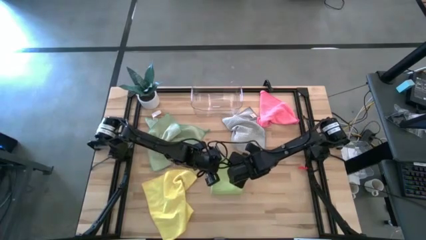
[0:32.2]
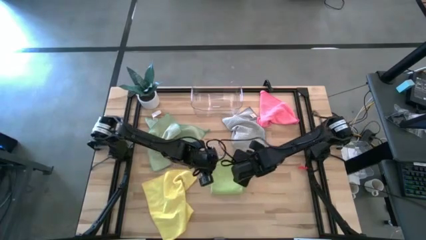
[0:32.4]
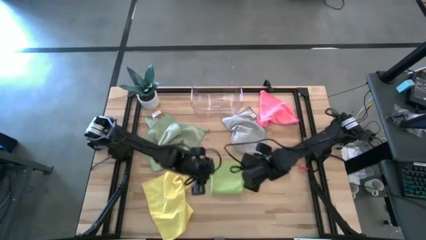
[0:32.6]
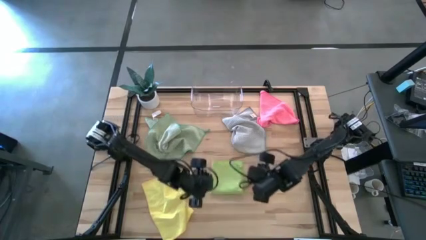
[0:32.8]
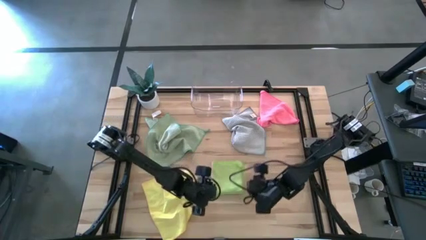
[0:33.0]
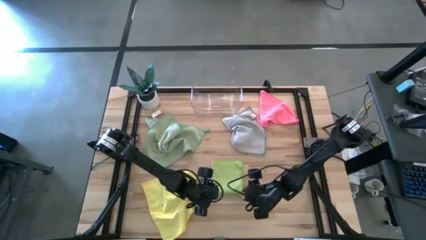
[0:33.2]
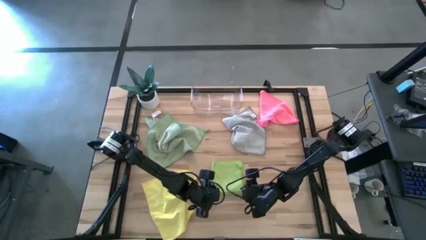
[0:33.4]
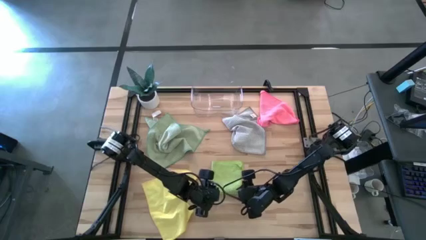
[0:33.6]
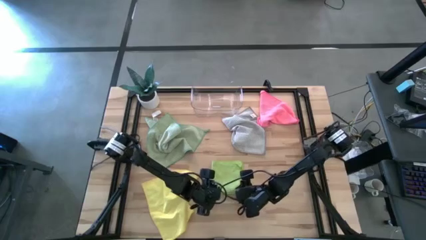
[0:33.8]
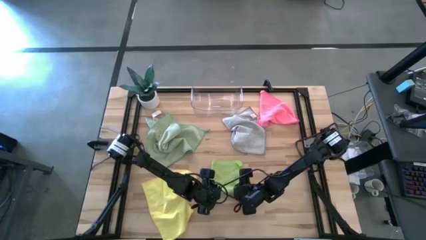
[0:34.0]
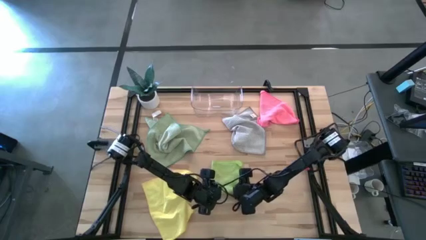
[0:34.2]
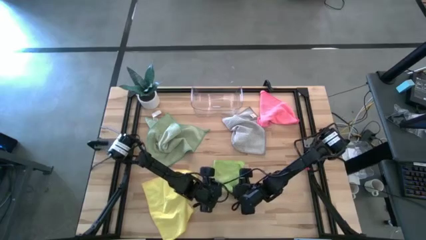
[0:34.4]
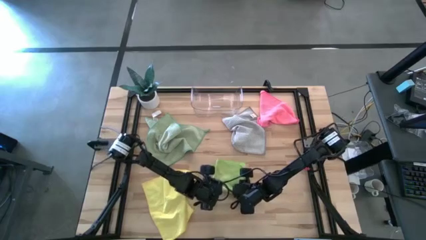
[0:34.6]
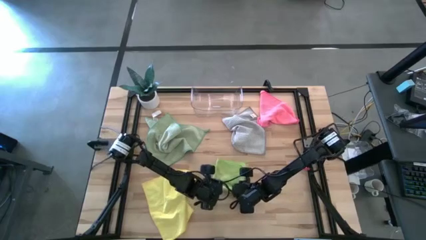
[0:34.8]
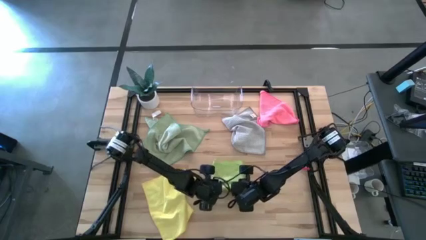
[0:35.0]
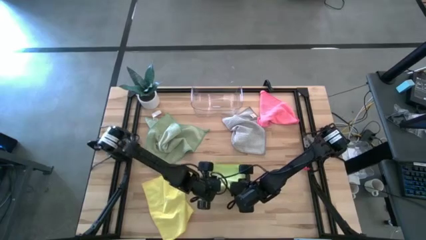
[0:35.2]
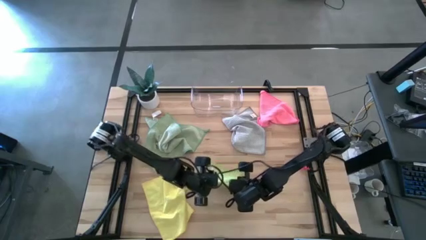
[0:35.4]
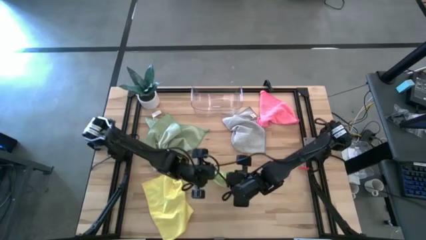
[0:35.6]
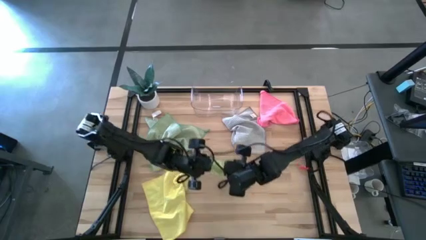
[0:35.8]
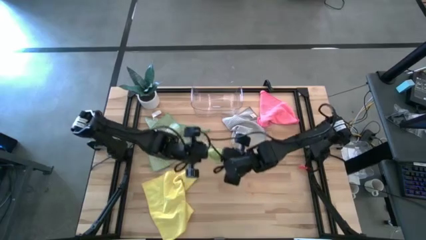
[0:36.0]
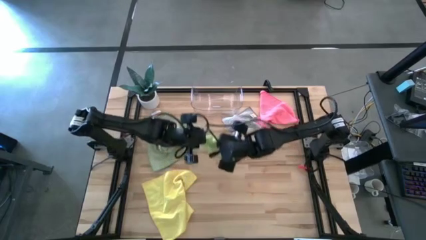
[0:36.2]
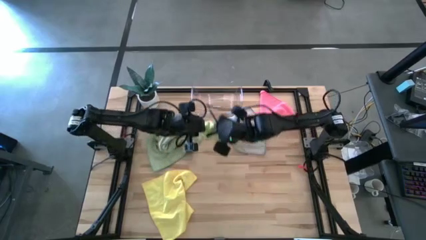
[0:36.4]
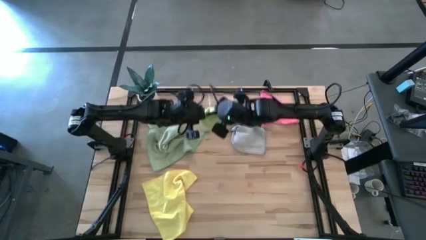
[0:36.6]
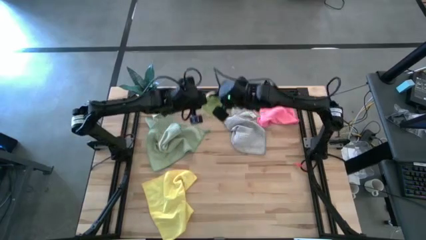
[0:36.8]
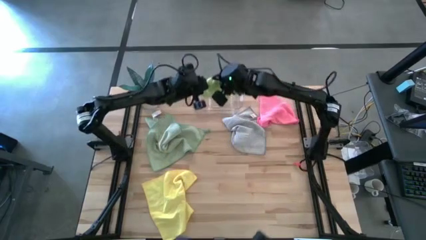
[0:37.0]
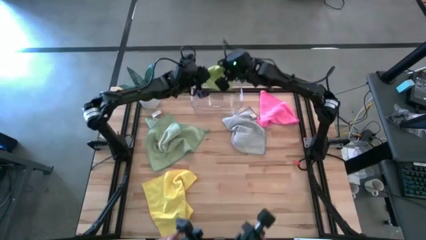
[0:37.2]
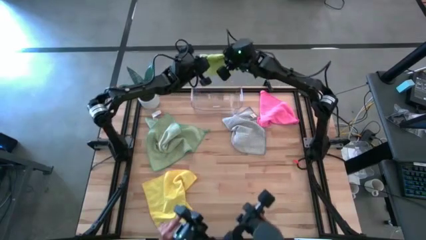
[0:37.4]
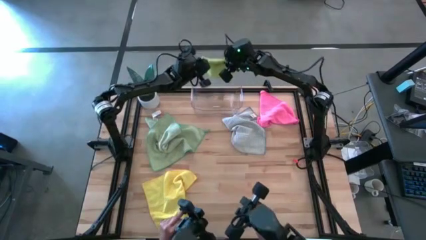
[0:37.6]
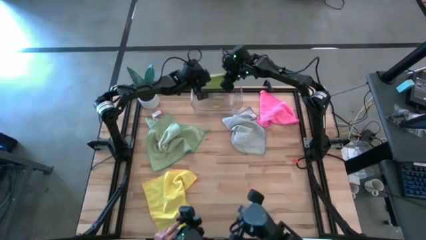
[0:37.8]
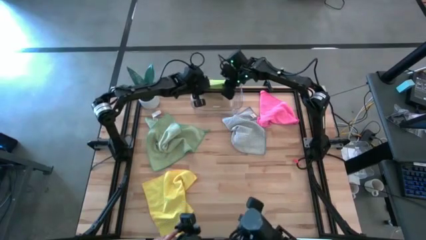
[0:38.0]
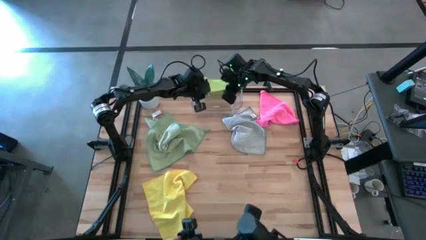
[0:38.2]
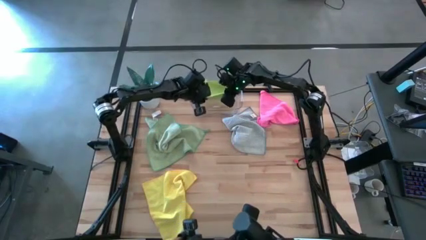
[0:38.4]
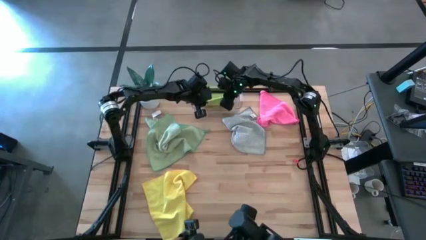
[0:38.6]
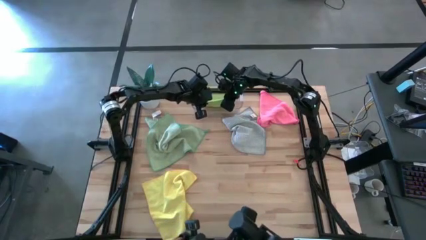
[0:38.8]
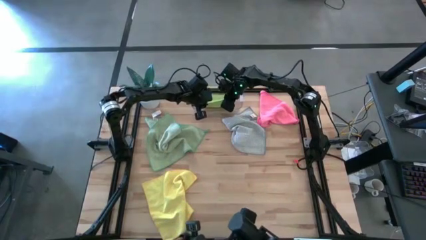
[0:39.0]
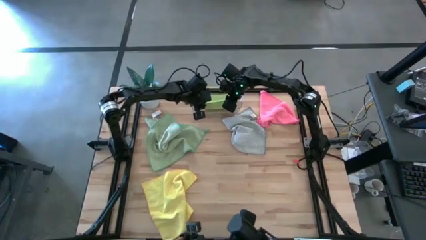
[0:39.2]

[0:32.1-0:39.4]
Task: Fold microfiber towels
Put the green microfiber cloth into the transparent bin

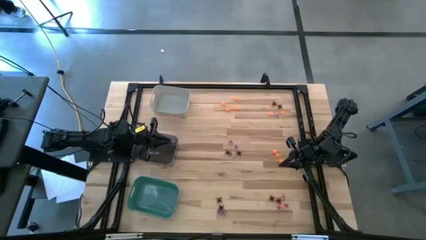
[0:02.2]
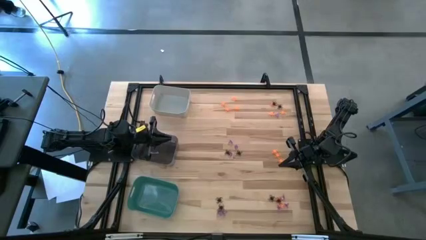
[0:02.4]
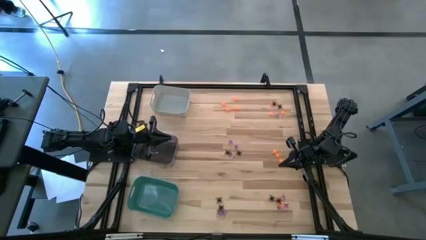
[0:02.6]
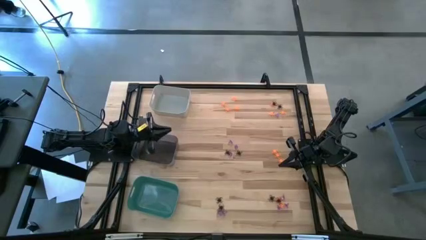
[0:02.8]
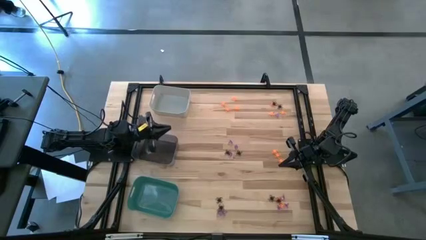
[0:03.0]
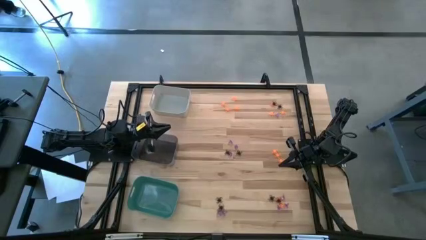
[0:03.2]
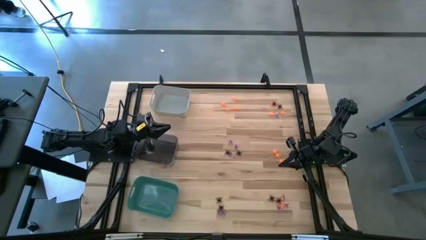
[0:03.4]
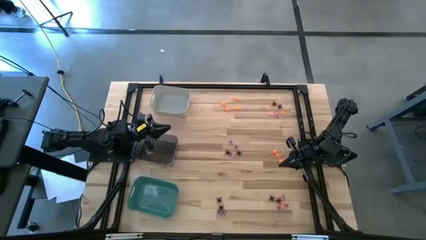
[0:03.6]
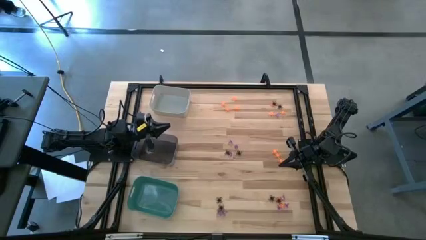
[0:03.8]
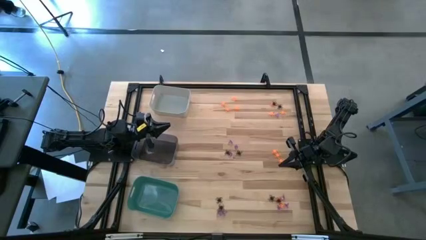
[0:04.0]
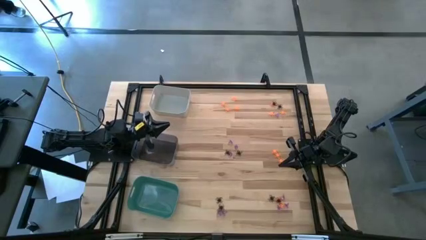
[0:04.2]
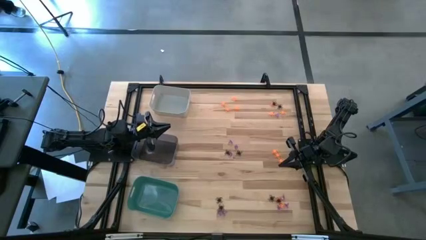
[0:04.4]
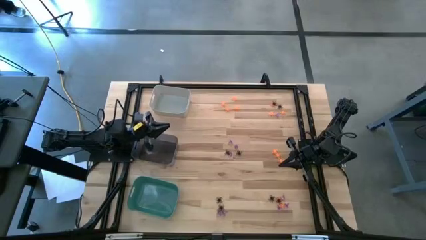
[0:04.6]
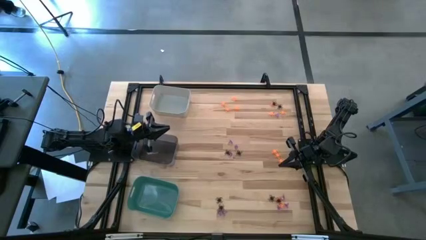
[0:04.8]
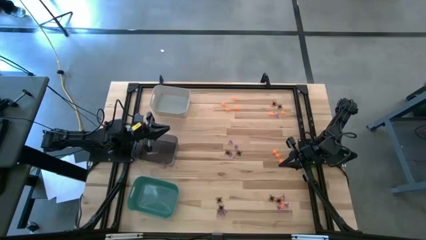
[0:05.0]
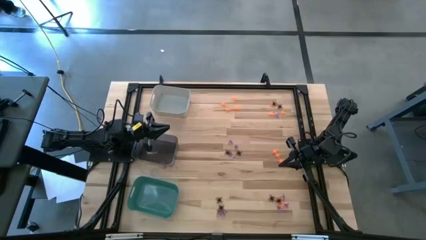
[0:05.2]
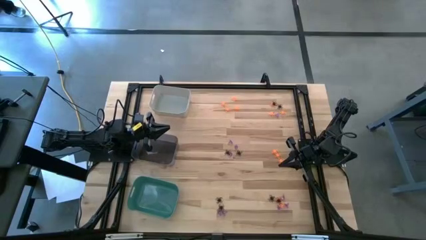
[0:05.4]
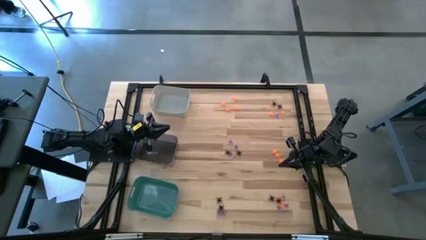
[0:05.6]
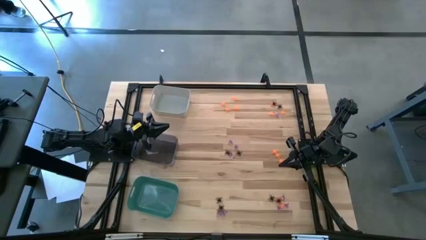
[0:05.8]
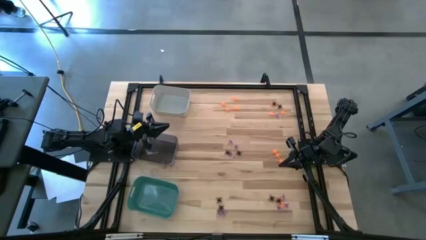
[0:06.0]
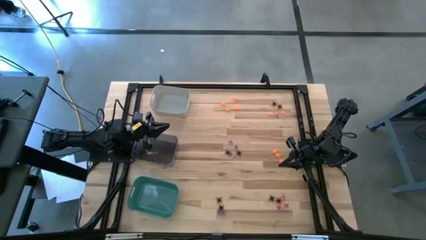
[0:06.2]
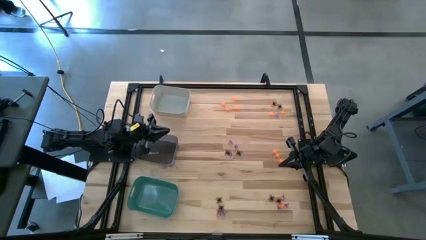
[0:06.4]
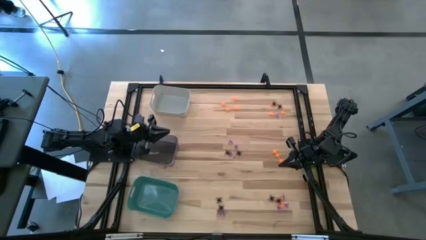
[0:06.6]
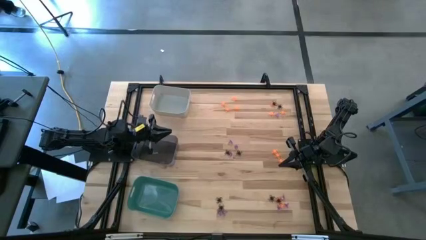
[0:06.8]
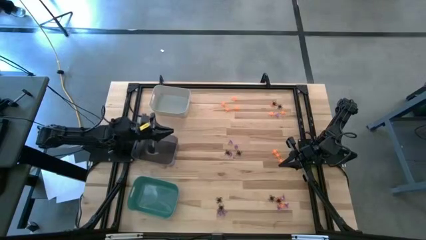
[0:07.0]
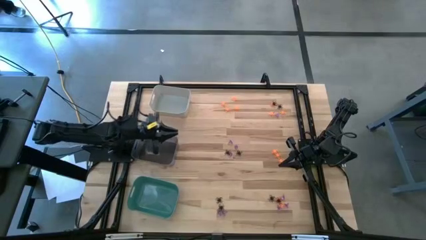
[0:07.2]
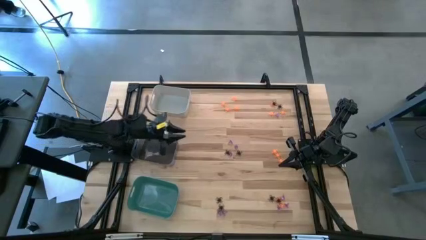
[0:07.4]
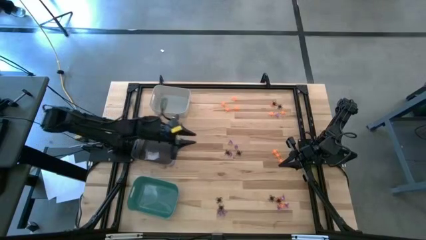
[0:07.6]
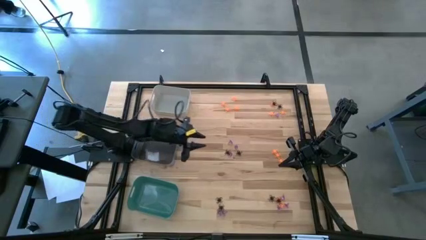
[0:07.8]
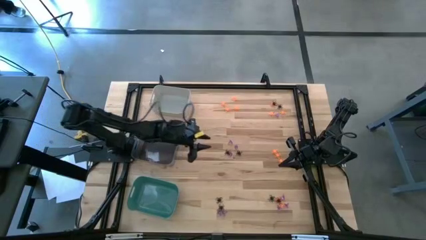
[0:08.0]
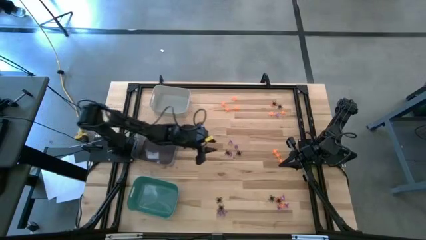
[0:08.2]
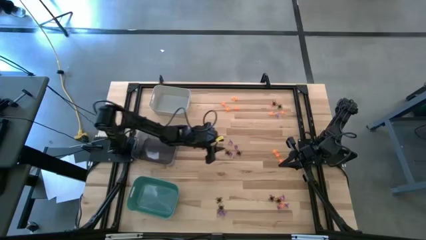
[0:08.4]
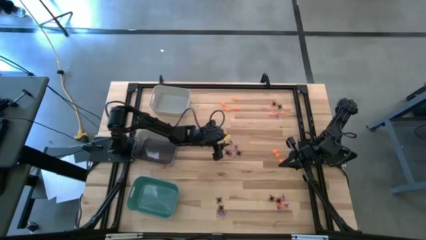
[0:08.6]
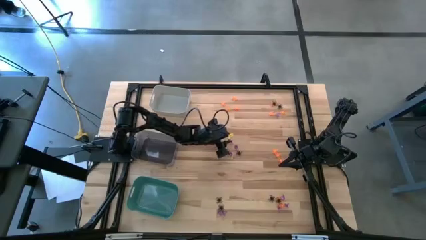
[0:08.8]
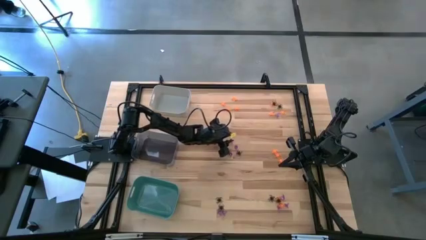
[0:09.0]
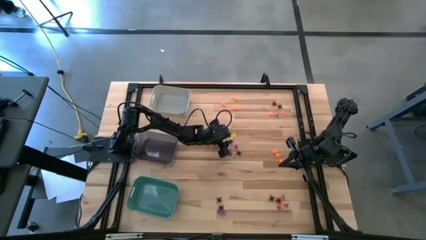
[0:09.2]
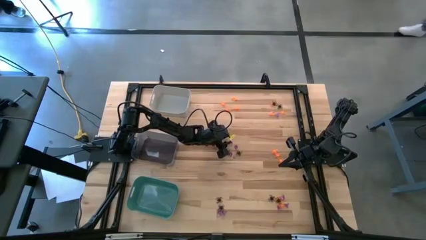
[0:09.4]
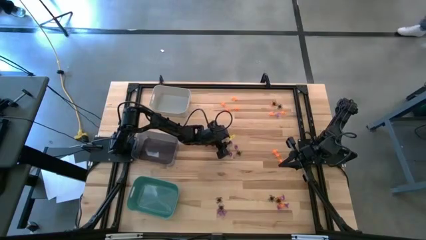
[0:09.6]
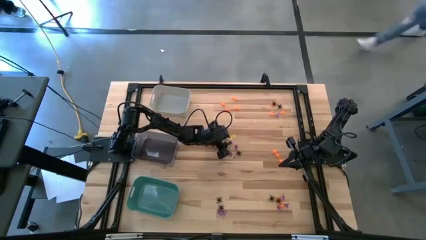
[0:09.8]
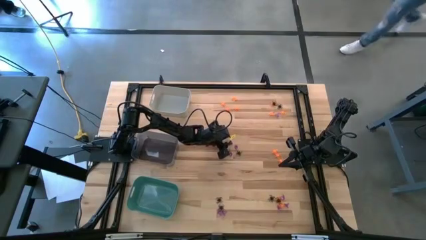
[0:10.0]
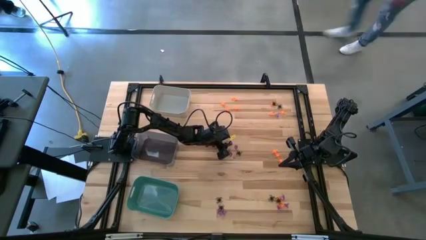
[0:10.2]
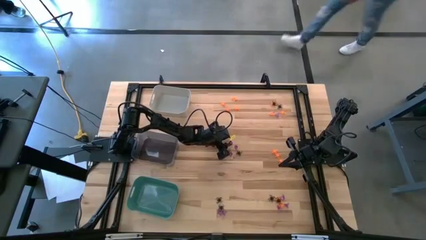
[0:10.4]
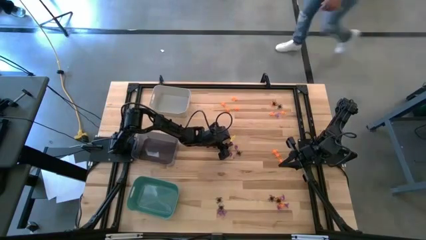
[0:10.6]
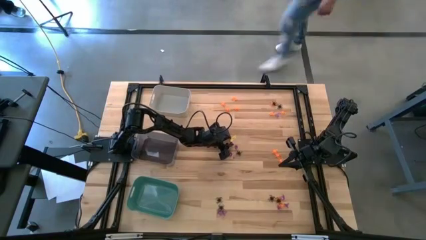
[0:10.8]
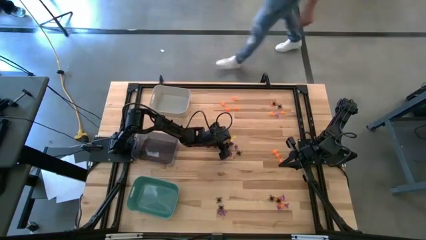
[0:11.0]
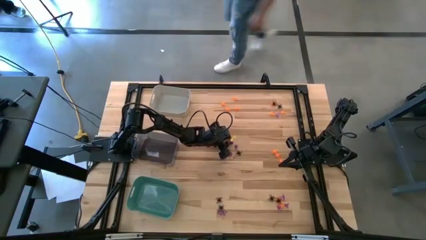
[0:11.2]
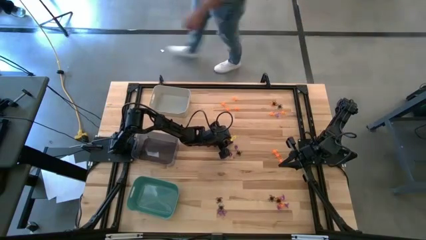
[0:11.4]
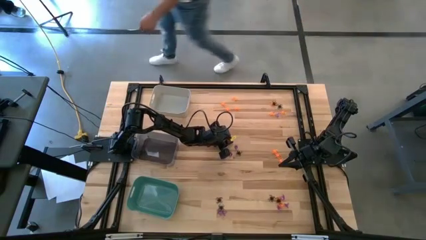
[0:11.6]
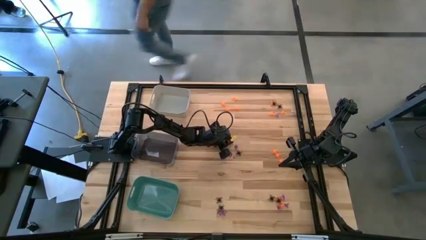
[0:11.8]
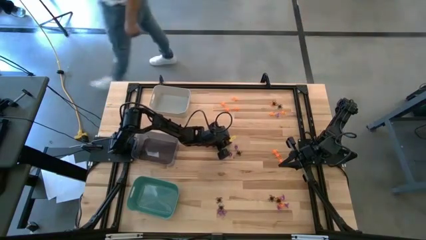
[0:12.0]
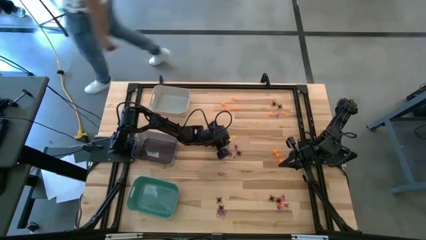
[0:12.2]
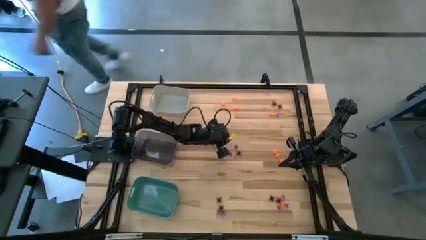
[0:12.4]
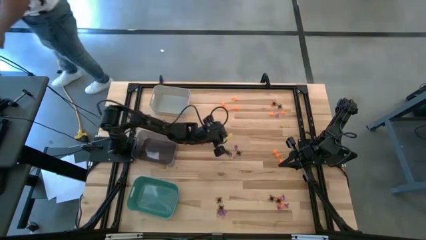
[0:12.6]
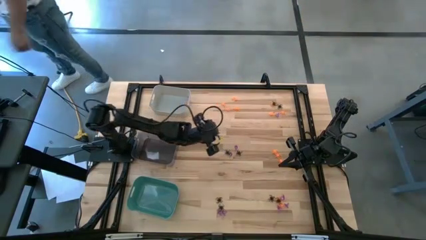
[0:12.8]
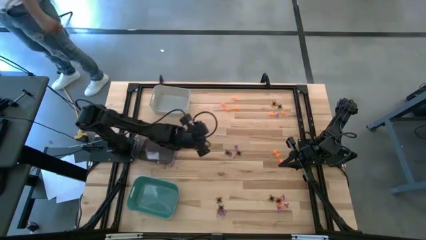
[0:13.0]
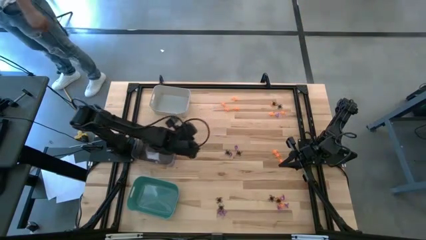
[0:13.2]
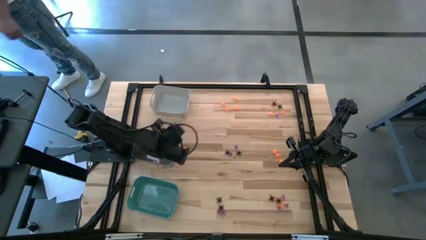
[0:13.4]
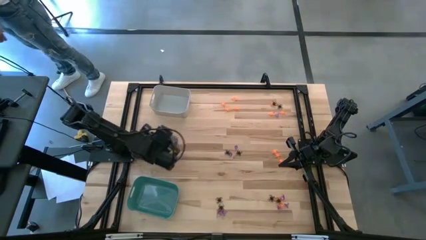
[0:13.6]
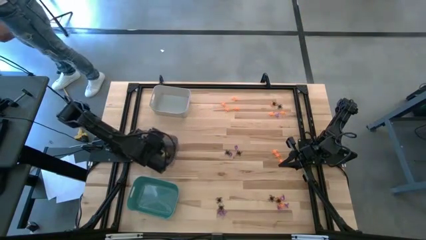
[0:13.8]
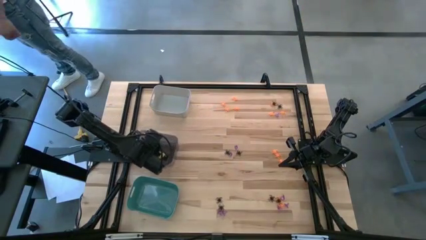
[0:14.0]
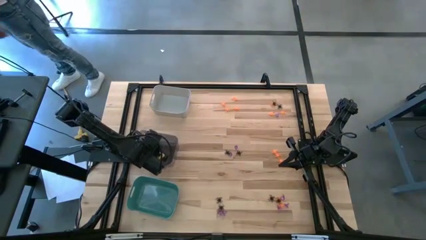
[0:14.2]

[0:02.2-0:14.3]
Task: Sort Halloween decoration
Put the center violet witch hat into the black bin
